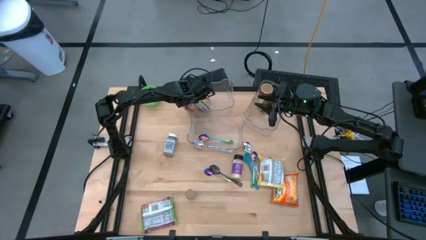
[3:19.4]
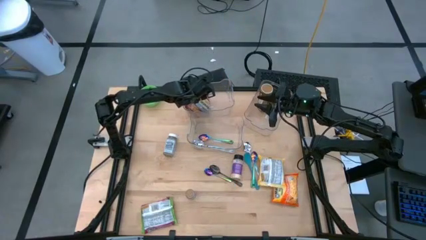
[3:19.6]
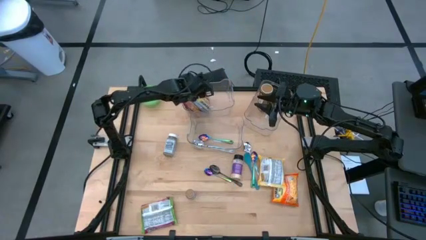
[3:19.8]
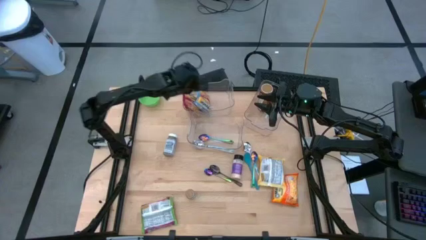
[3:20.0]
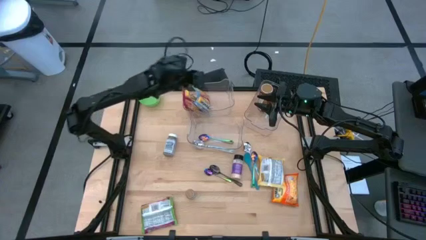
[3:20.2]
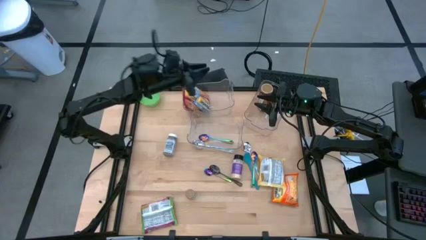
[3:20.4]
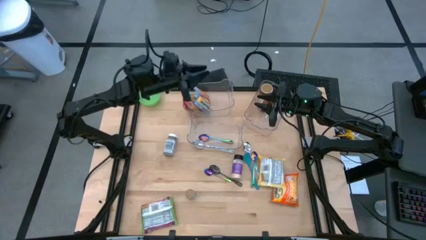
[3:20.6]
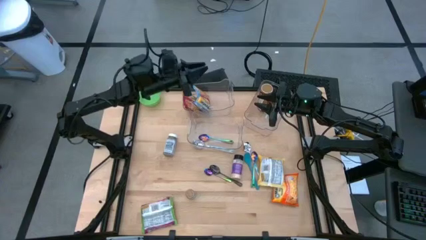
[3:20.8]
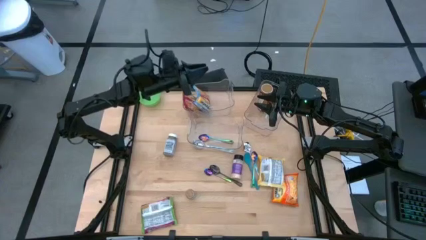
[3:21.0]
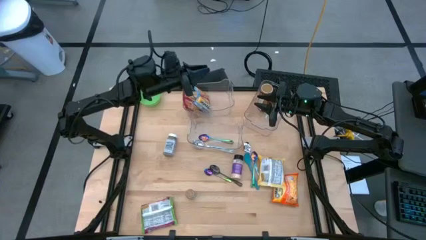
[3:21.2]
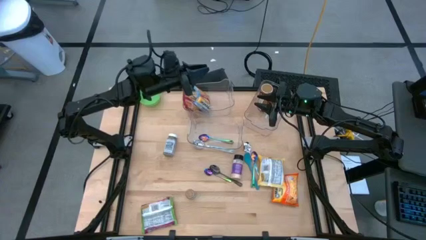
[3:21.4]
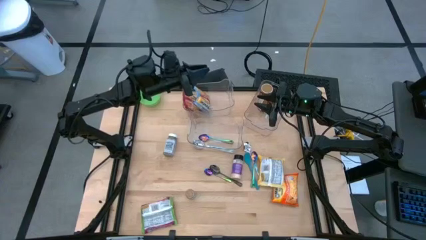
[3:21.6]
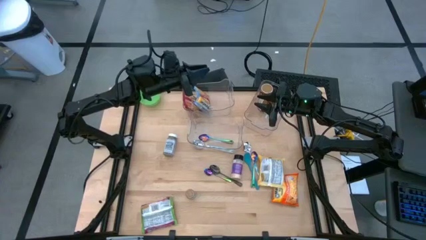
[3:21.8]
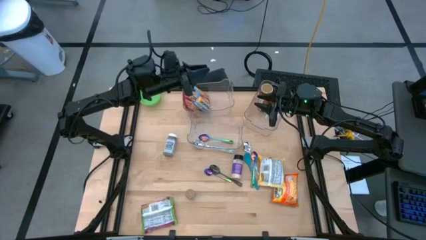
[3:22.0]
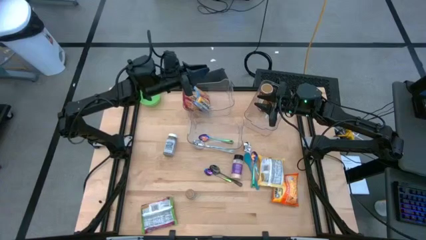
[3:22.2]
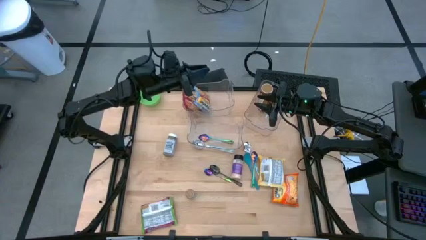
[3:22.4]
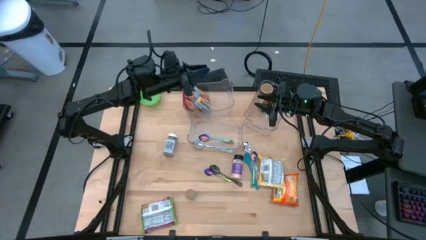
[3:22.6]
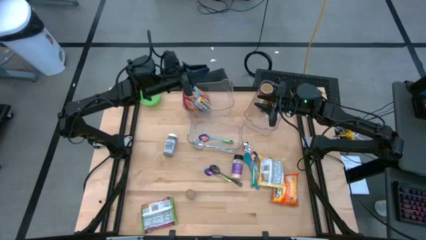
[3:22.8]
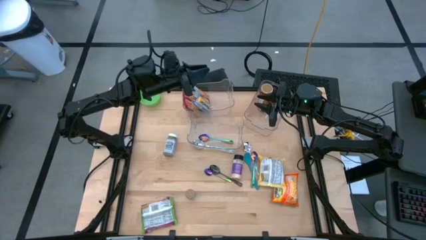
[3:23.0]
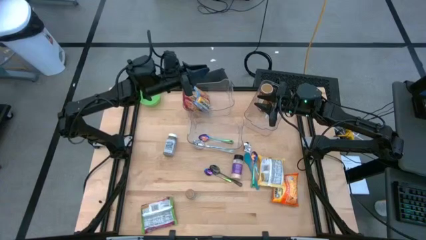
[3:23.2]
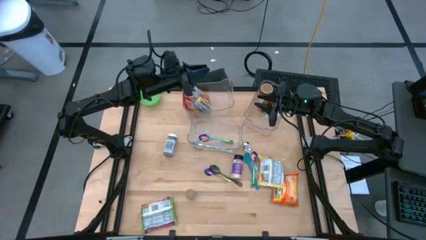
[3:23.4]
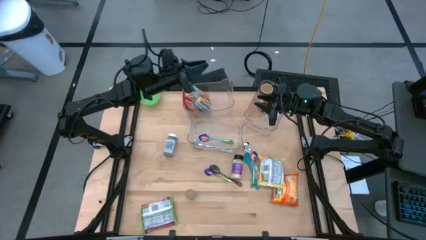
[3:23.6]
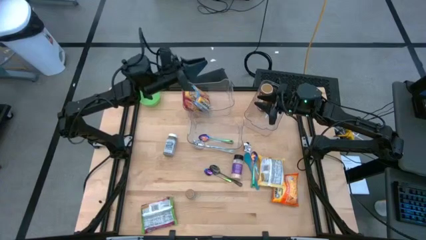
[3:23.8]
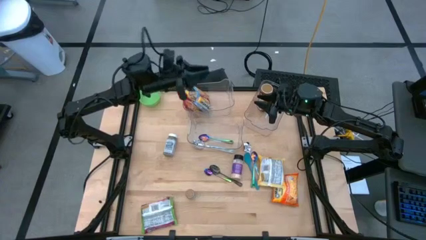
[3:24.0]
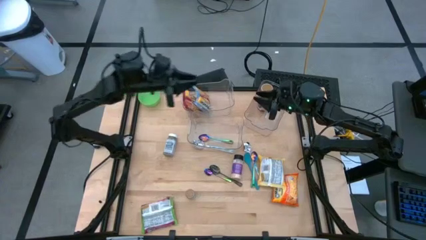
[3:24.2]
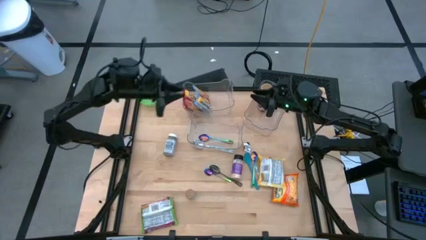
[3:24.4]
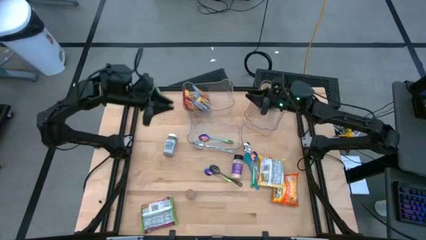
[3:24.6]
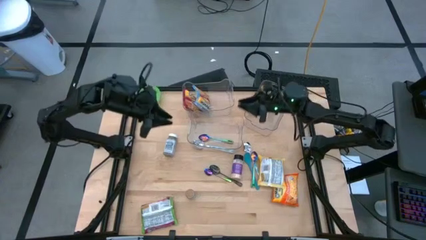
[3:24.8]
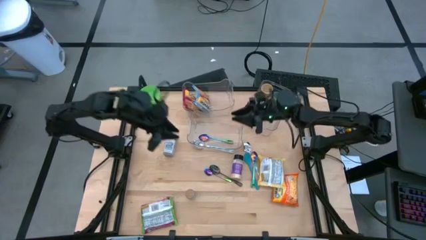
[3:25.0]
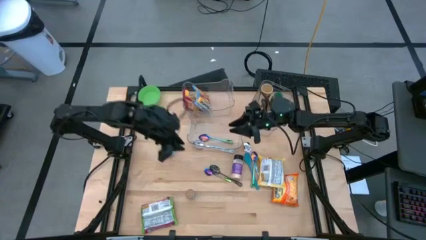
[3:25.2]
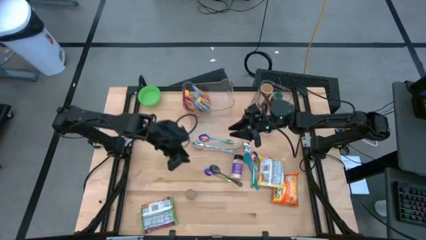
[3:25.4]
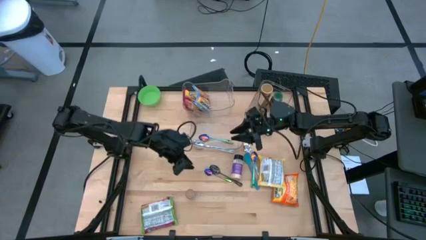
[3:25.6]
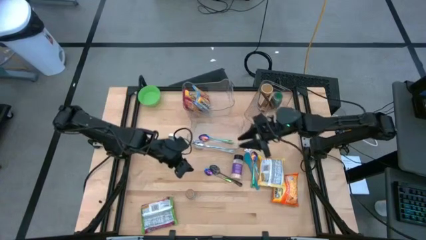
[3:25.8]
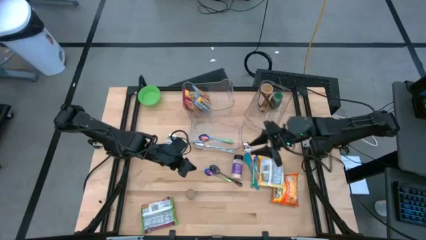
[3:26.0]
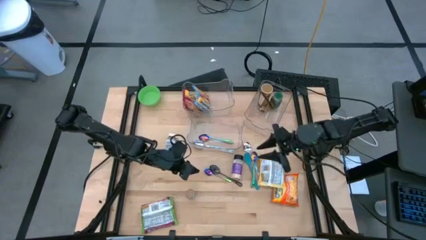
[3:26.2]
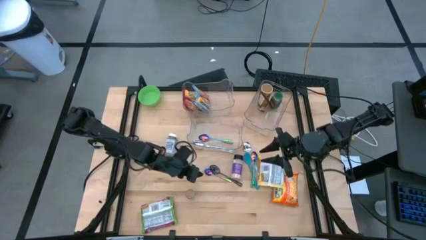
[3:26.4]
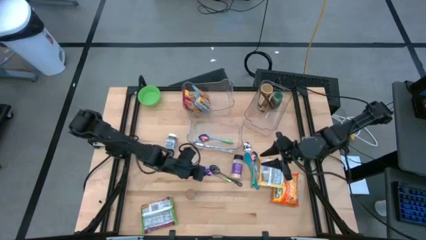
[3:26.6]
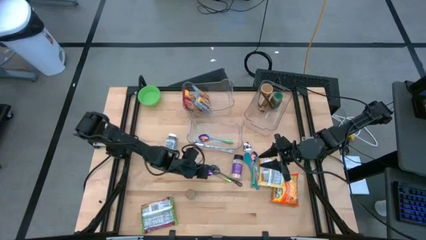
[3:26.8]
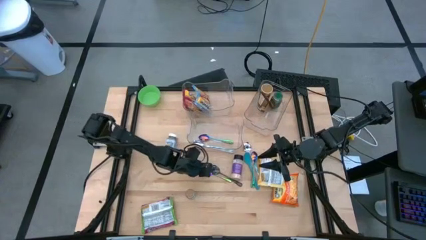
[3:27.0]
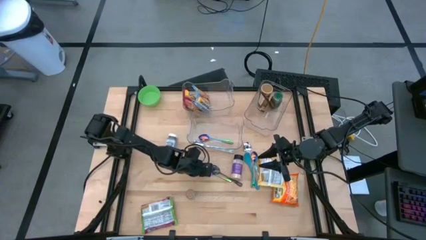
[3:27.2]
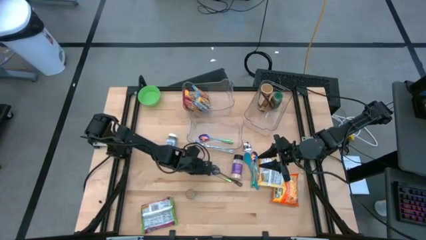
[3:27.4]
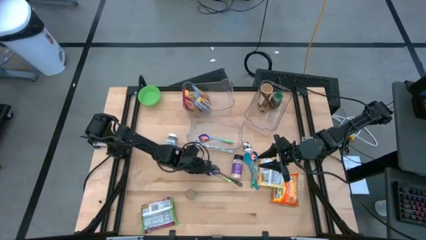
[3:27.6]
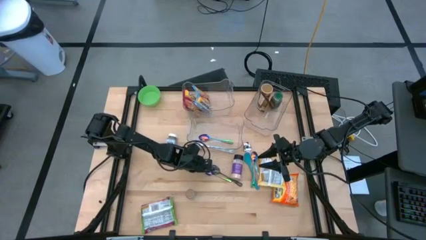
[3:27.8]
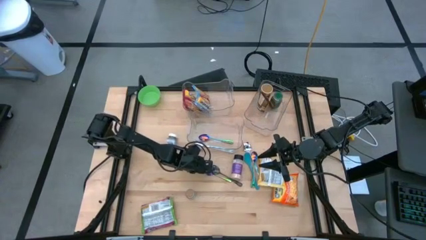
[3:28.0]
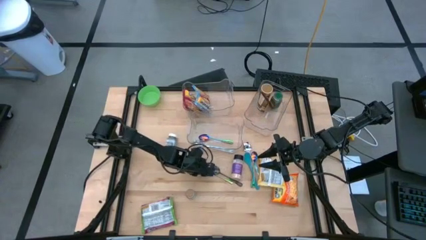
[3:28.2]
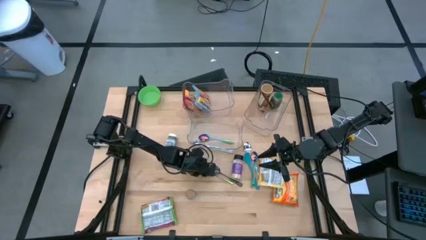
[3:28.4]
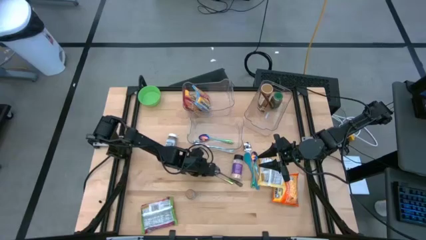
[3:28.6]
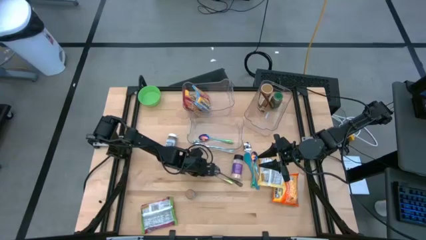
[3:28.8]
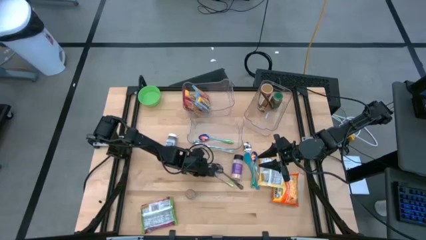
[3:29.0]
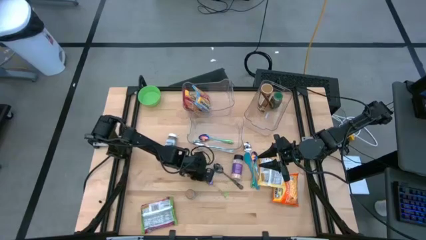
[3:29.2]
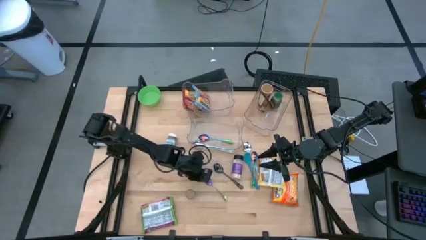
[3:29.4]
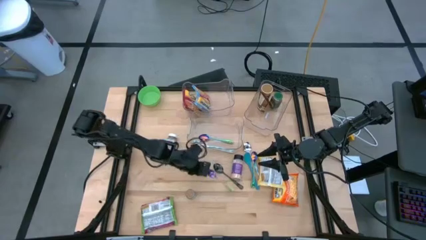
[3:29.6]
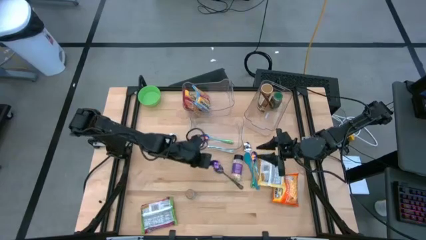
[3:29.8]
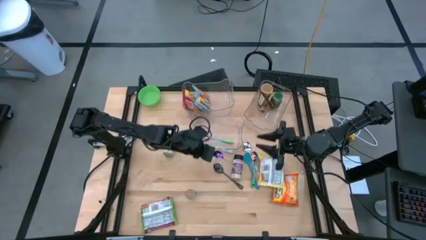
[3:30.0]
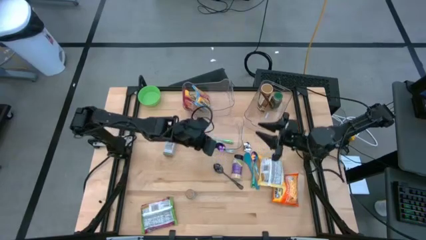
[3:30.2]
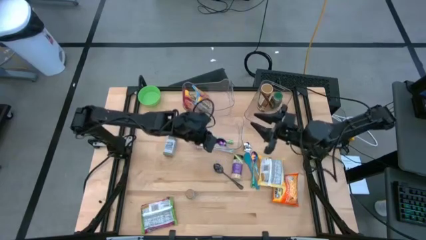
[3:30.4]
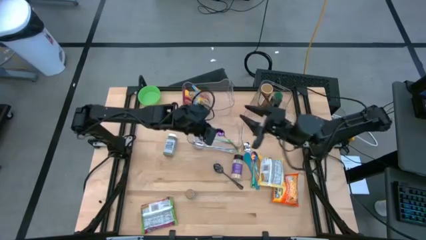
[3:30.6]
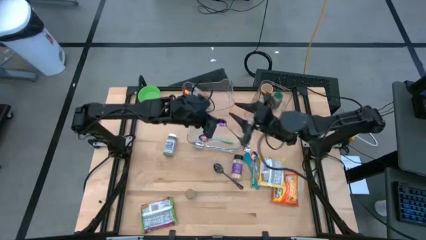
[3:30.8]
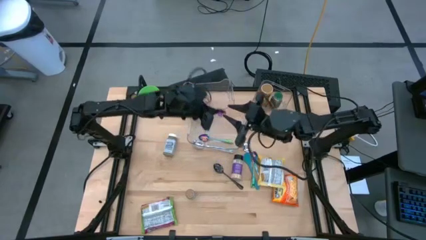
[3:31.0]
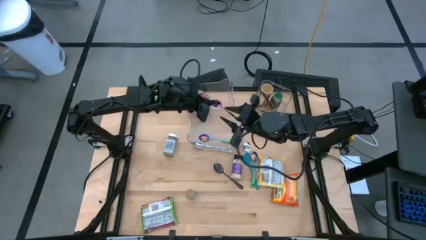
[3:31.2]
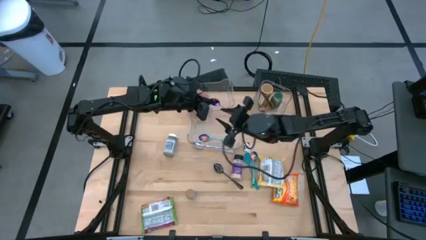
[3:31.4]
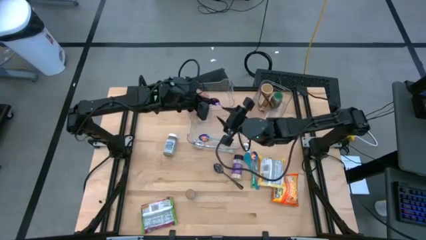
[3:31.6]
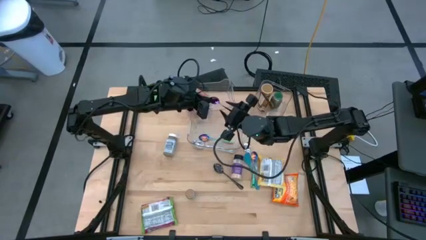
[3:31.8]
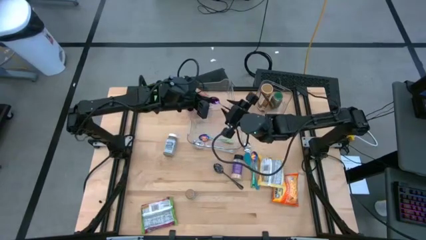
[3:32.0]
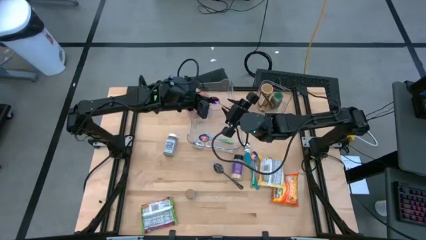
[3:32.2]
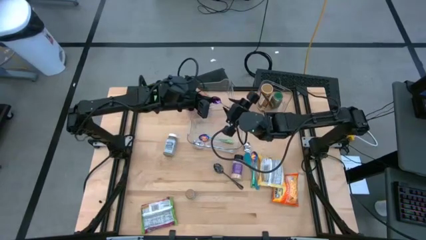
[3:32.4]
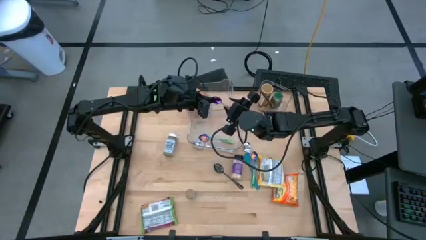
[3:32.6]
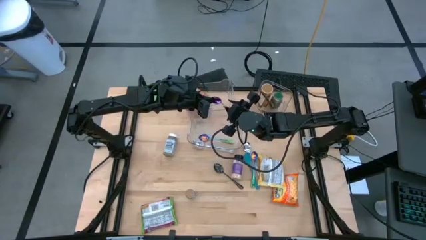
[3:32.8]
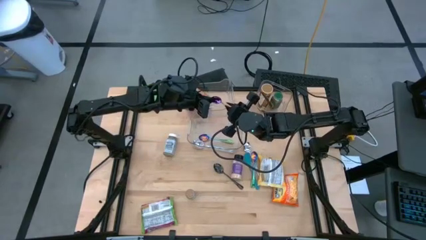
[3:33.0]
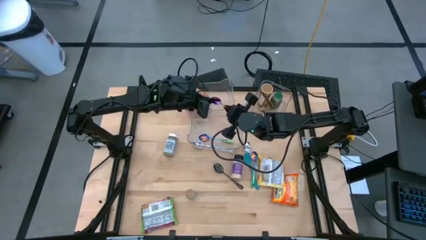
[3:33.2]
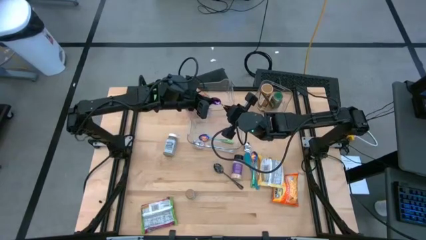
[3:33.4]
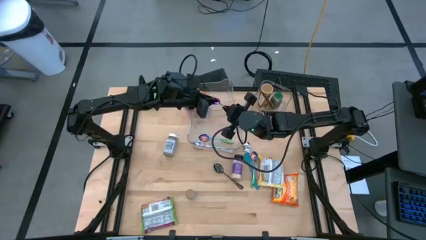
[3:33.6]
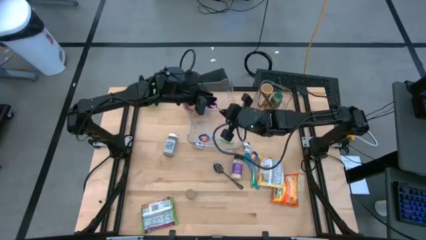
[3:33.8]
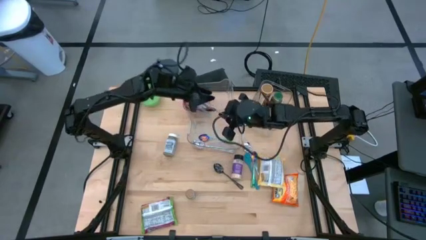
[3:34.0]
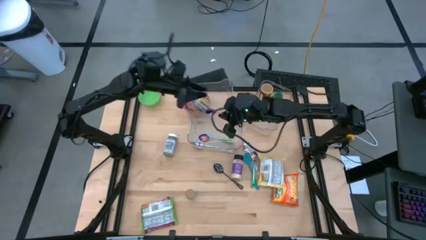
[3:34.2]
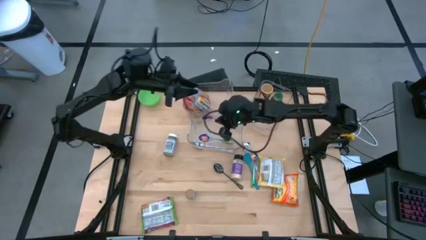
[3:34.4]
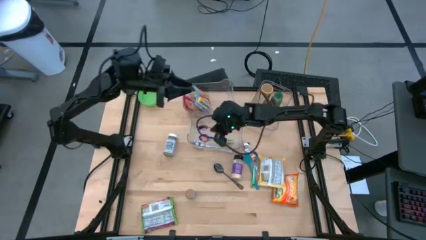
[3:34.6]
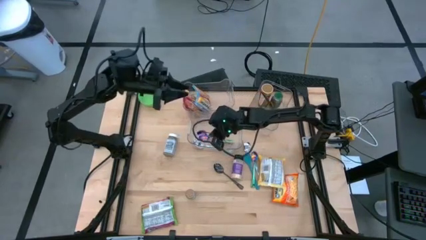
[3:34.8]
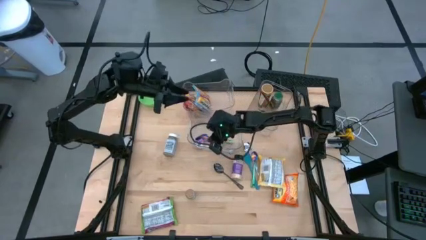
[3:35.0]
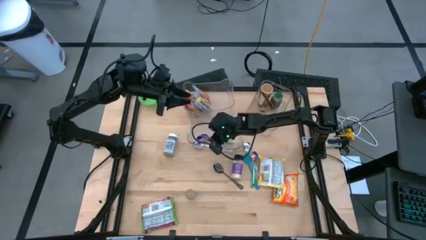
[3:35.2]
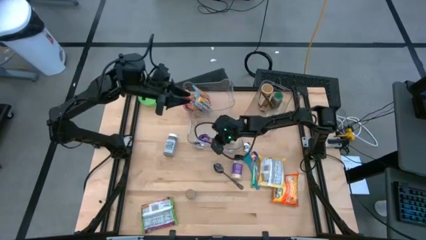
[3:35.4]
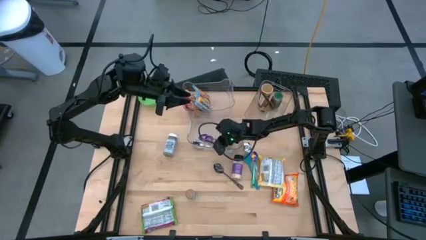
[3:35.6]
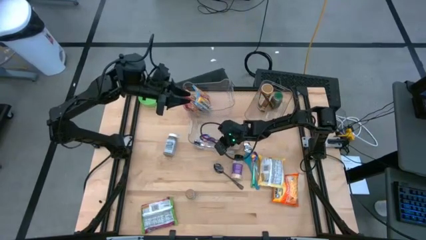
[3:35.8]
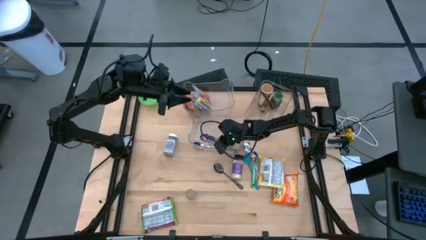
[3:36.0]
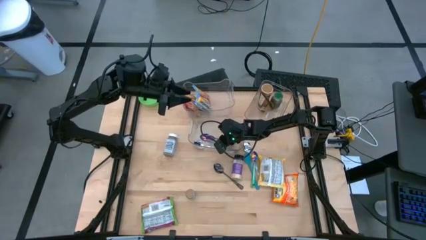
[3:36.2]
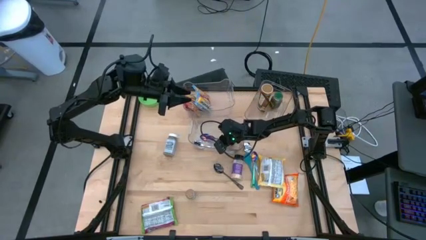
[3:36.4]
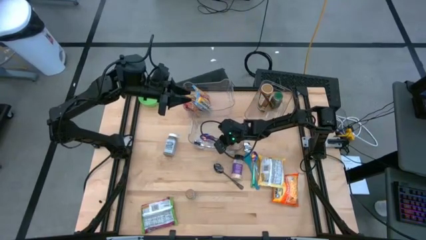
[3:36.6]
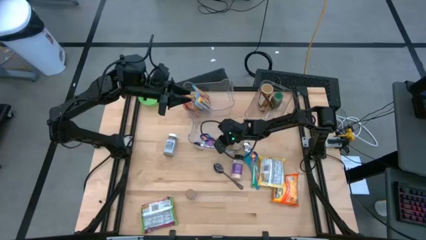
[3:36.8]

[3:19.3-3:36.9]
Task: Pick & Place Food Item
Put the left green spoon into the bottom transparent bin
